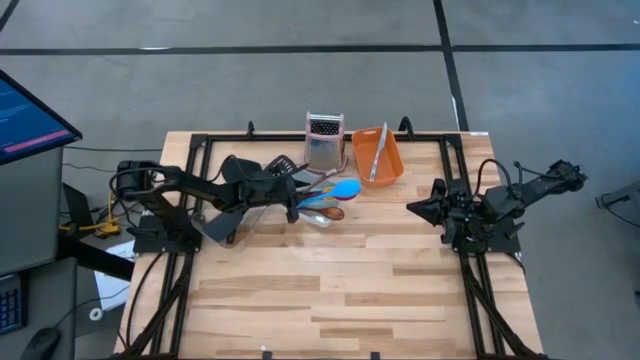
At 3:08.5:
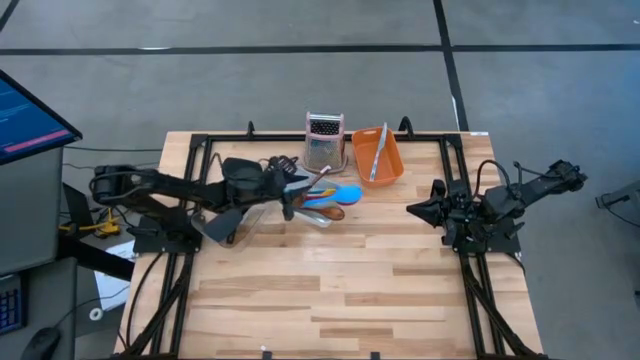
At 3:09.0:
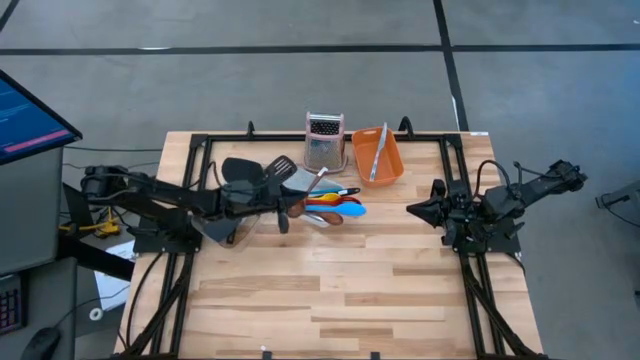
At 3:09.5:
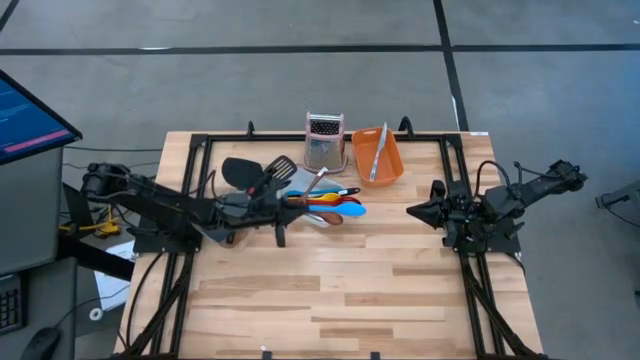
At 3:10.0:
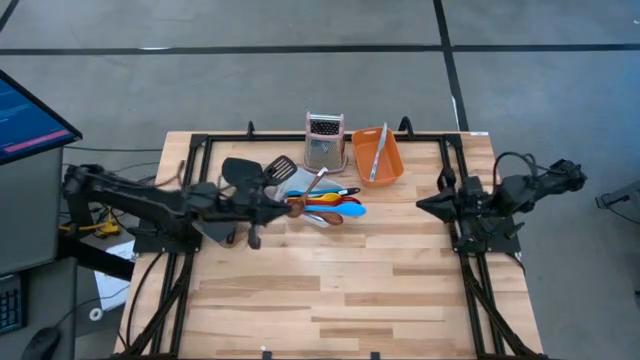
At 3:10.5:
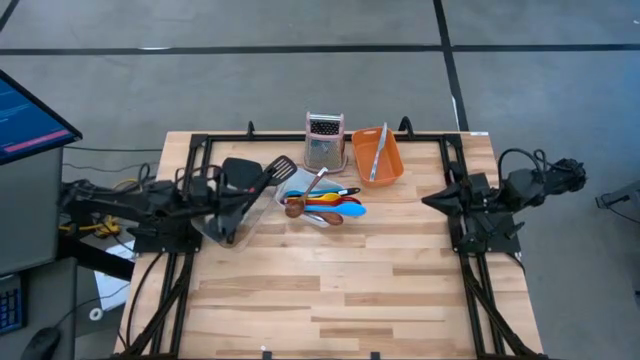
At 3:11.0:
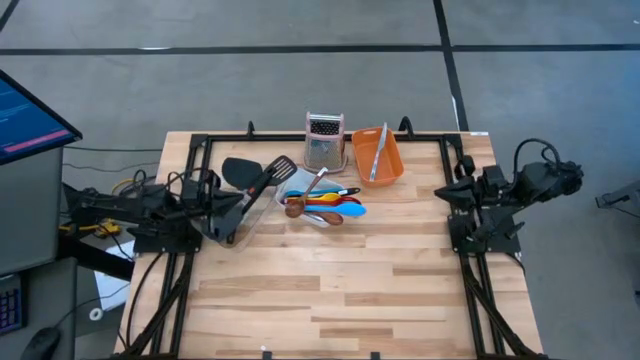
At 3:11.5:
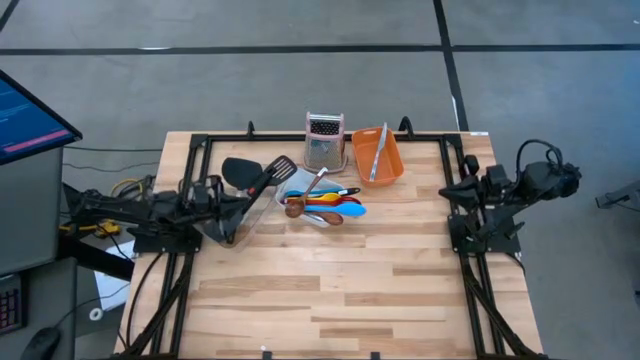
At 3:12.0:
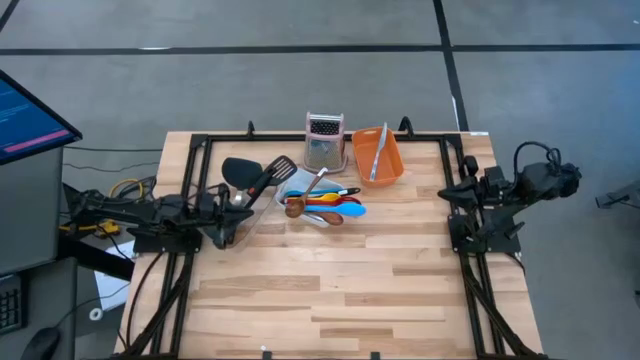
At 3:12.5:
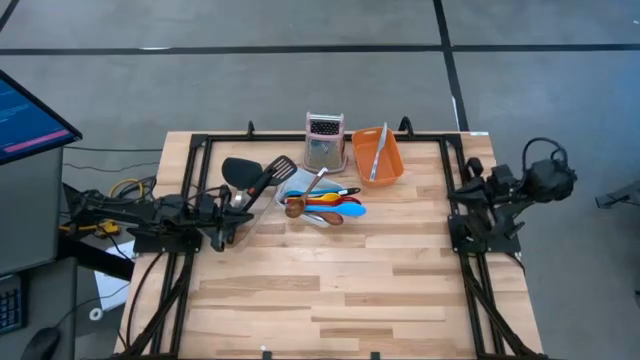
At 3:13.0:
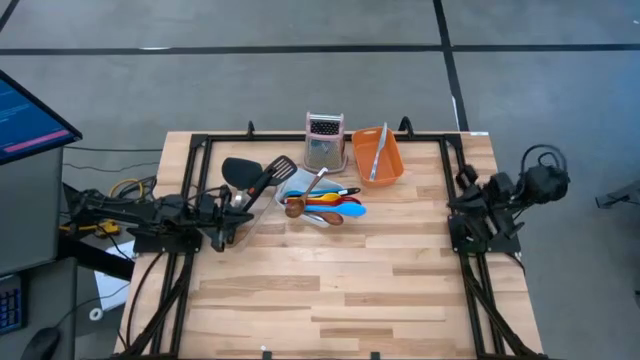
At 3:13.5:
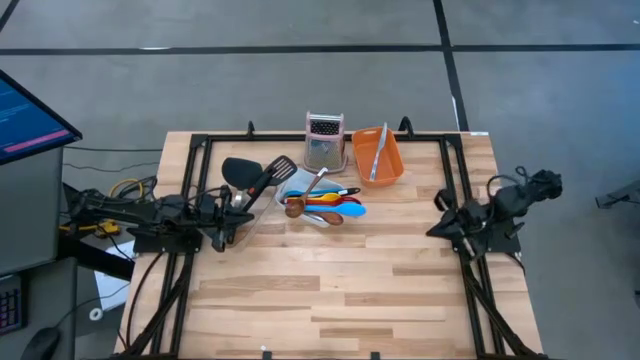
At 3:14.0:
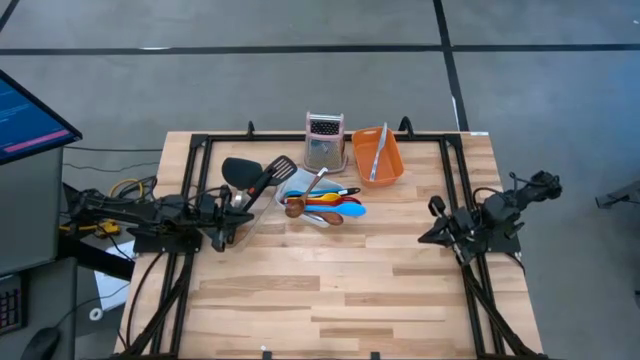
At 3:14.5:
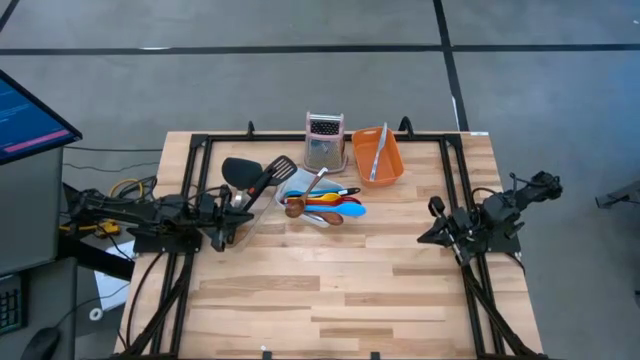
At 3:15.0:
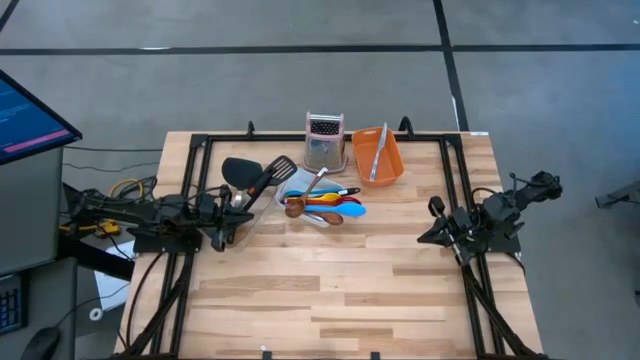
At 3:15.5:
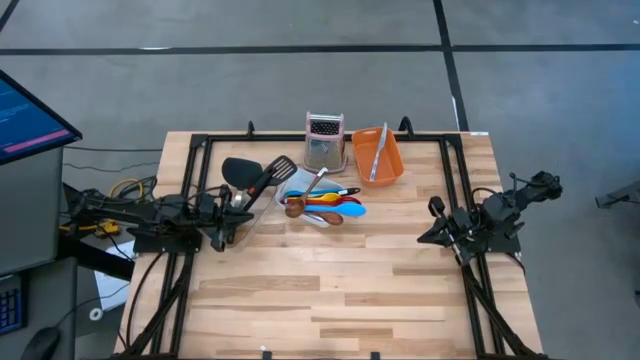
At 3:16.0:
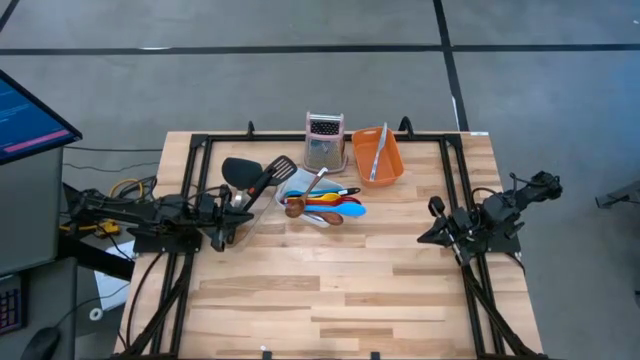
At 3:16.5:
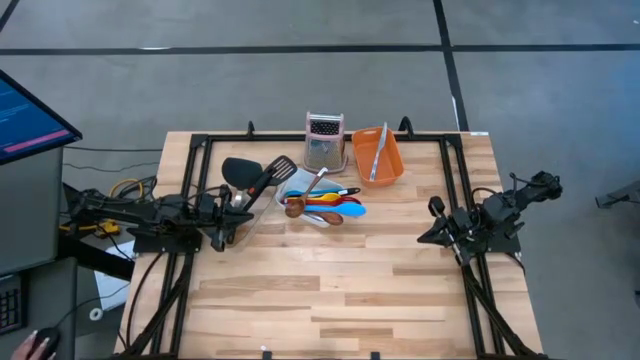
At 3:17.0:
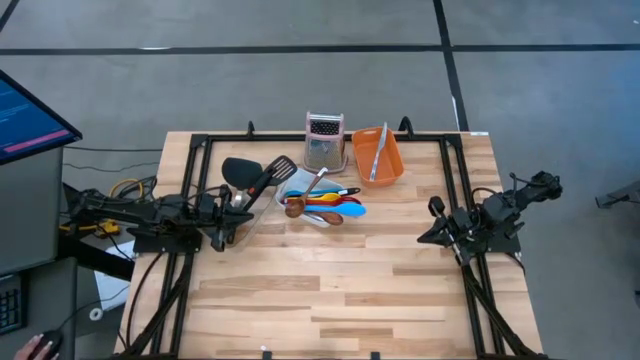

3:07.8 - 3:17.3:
Task: Pick & Place Kitchen Items
Return to Home Position

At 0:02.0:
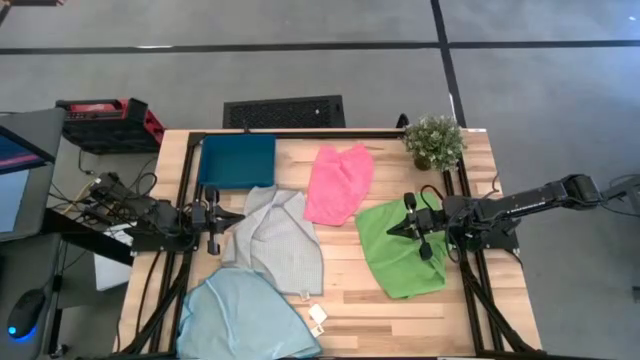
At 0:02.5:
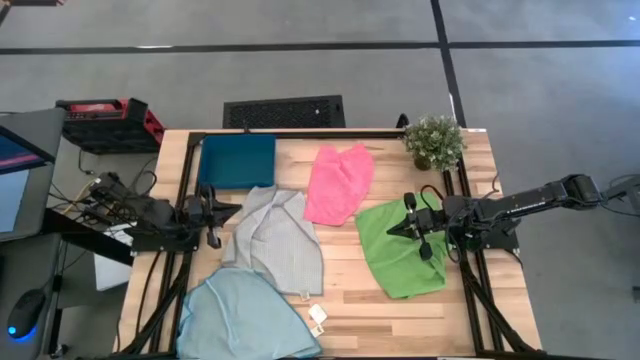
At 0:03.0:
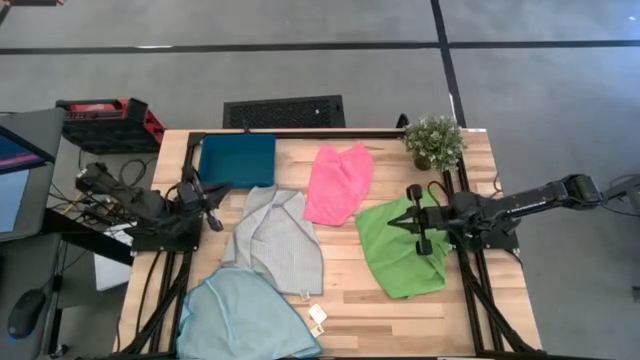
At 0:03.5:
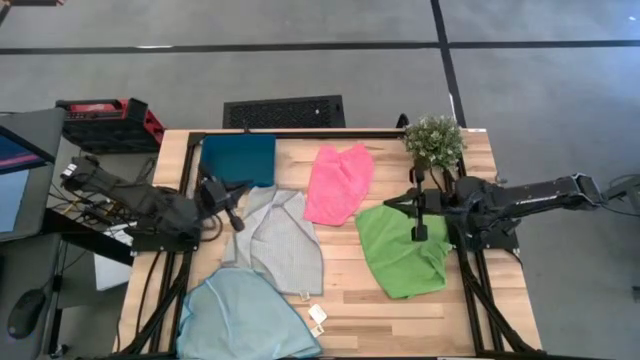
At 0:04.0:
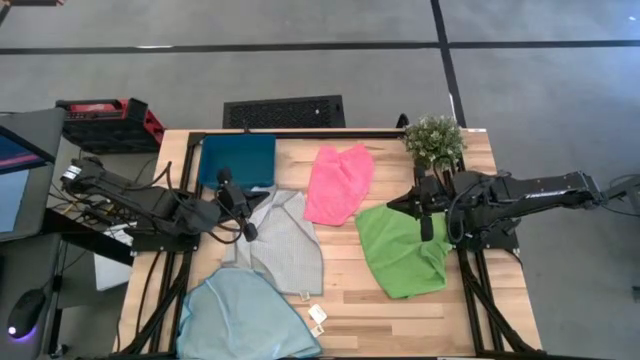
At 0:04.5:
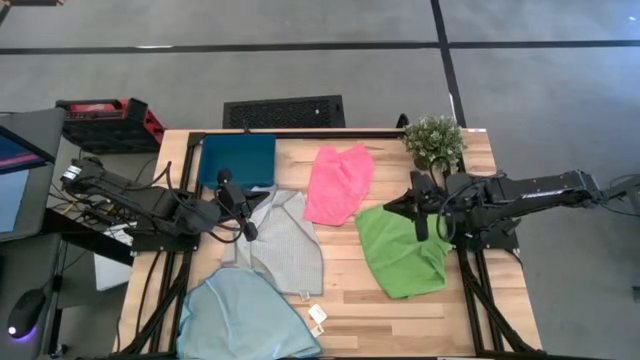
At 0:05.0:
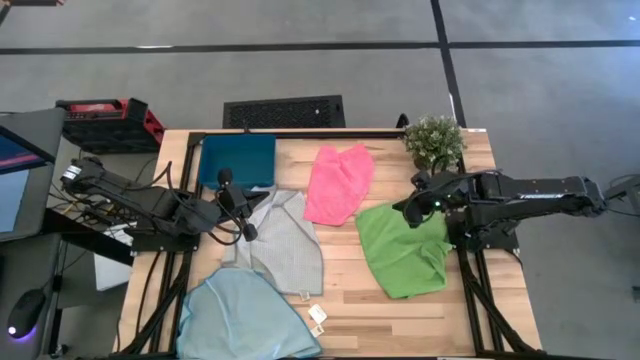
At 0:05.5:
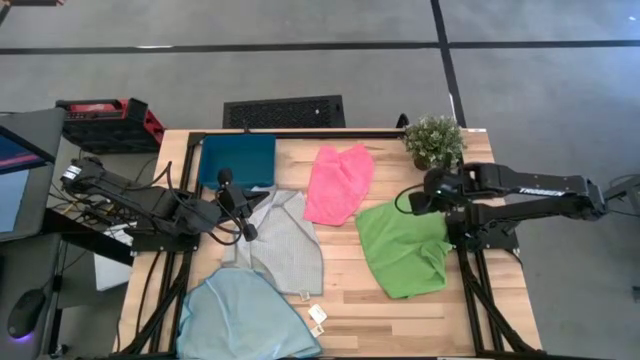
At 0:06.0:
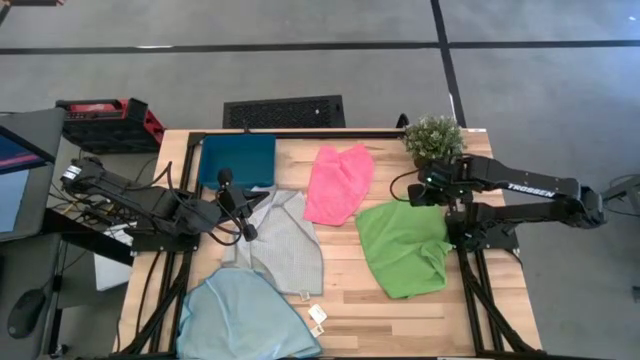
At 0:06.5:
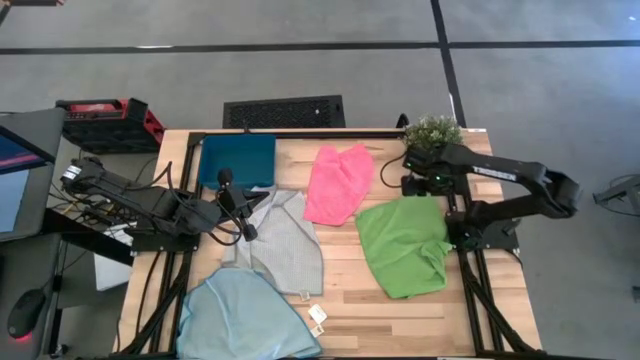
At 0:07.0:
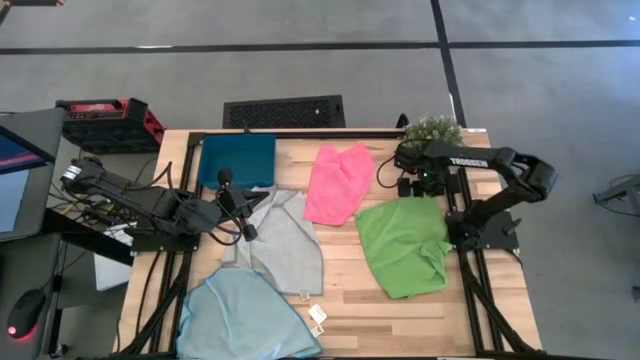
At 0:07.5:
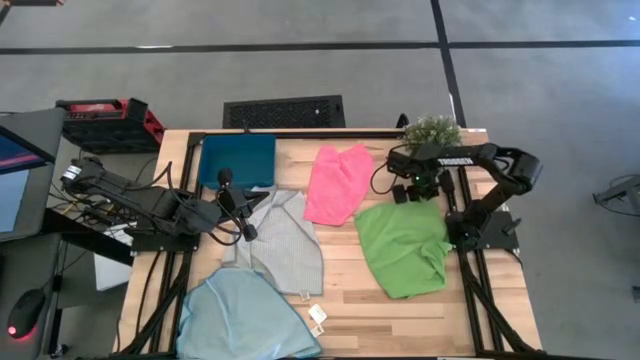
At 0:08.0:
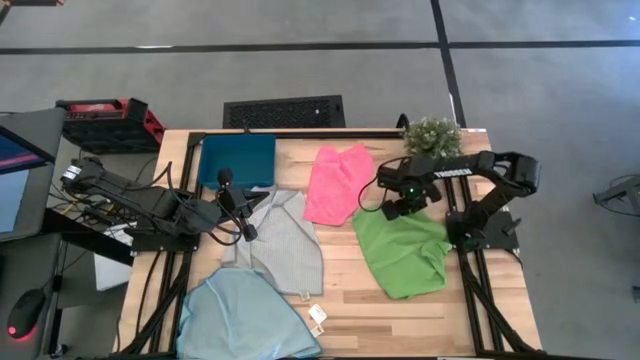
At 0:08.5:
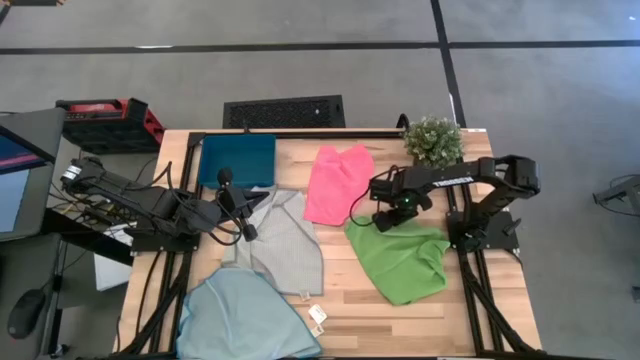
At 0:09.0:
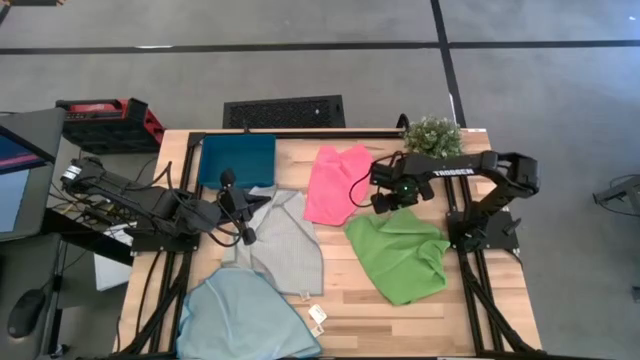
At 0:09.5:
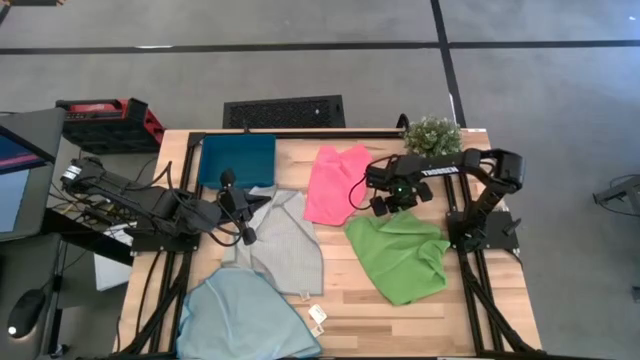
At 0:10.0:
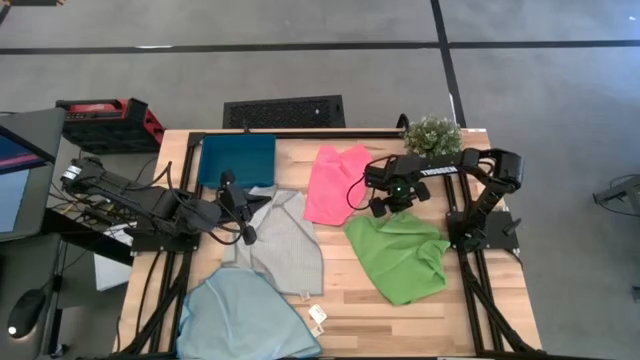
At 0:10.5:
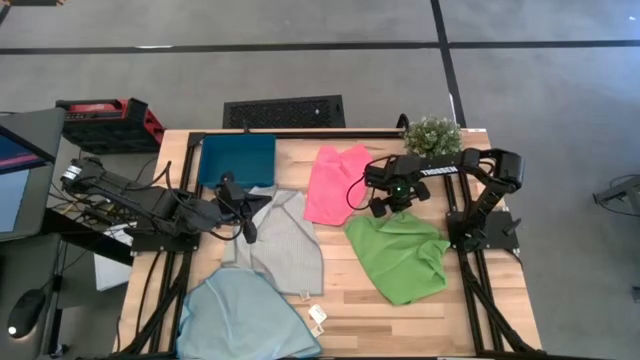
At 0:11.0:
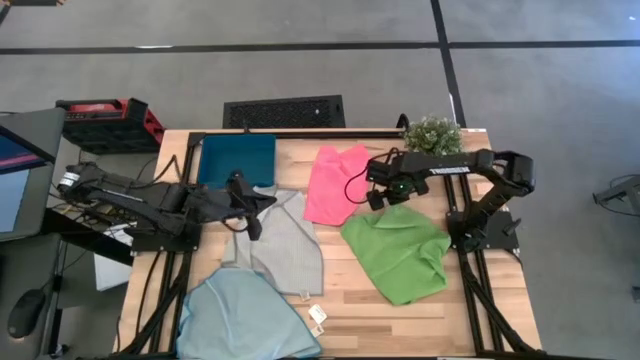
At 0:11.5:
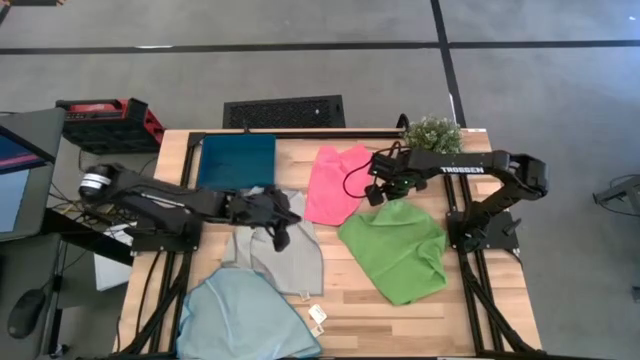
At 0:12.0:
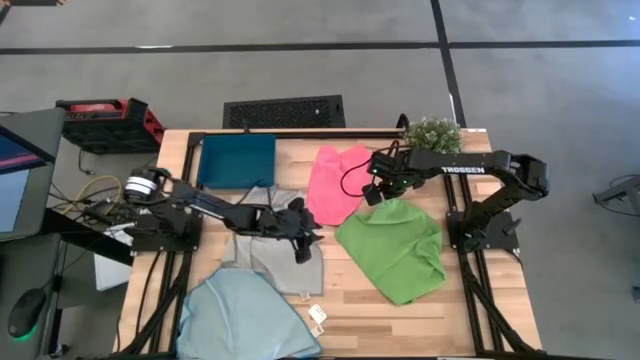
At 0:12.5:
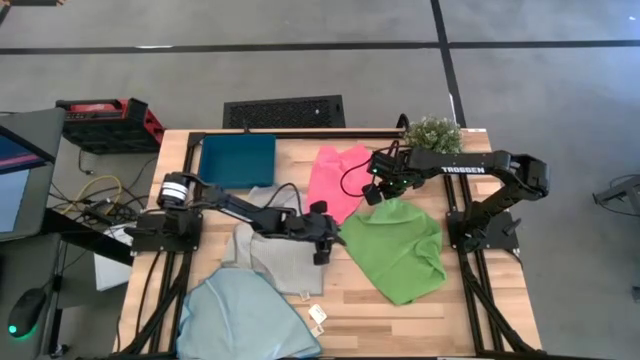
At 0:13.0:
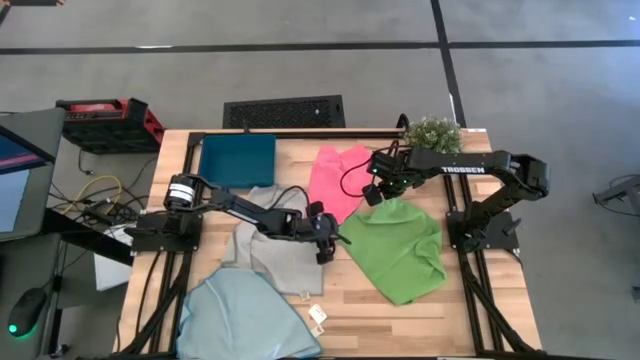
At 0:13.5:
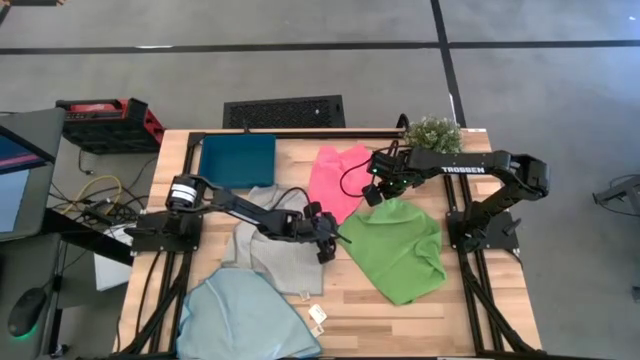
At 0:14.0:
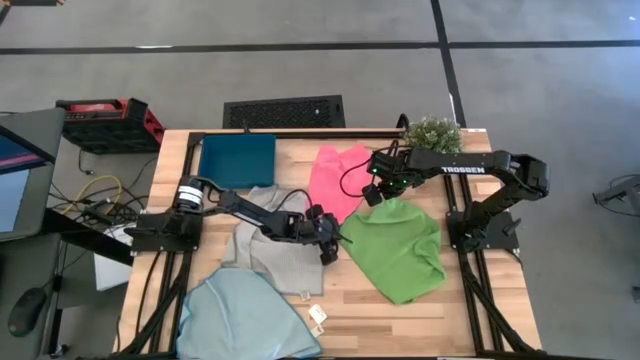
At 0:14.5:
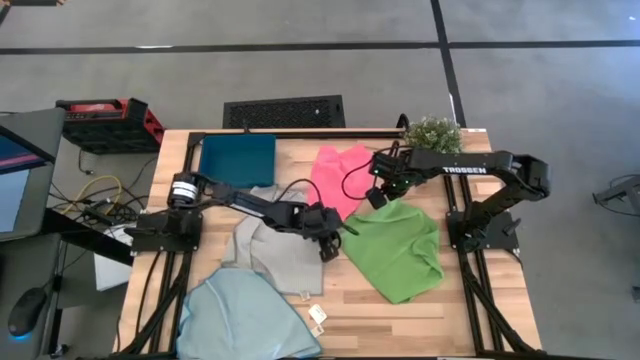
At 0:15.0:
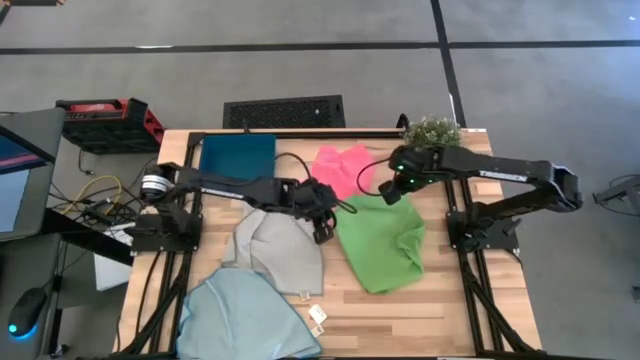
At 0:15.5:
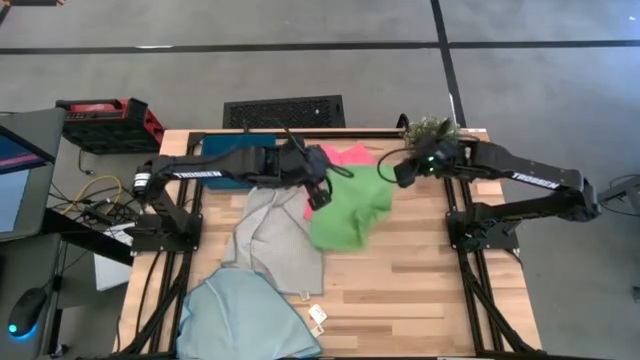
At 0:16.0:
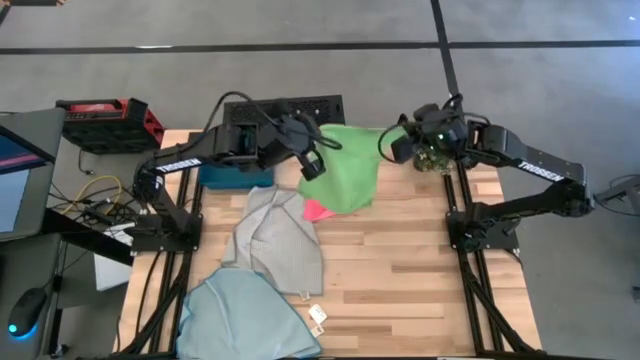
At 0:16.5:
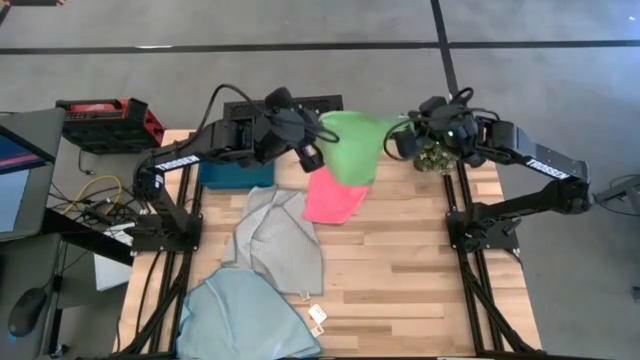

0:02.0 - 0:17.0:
Task: Fold microfiber towels
Fold the green cloth
